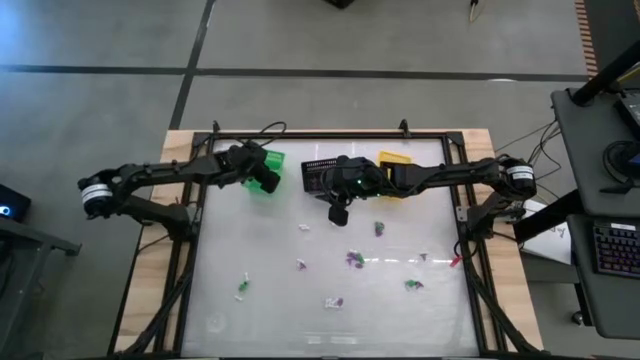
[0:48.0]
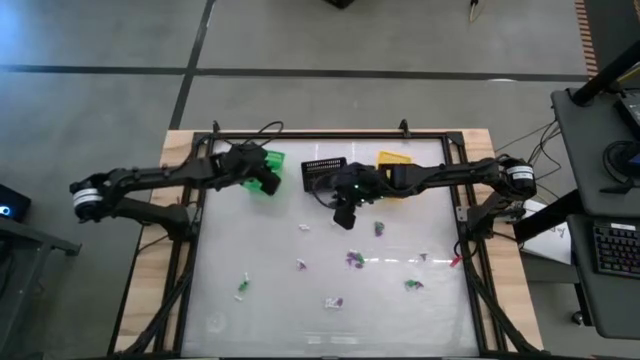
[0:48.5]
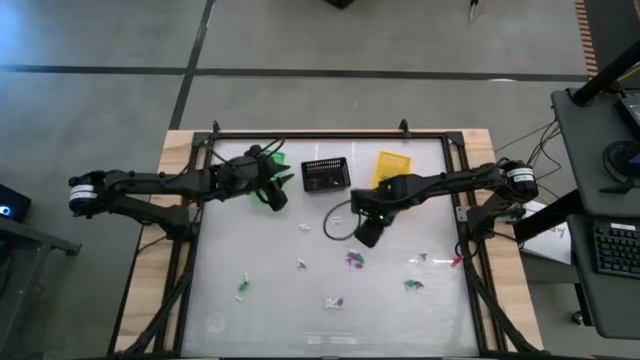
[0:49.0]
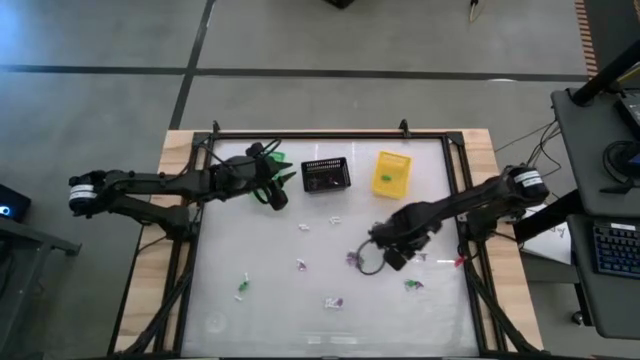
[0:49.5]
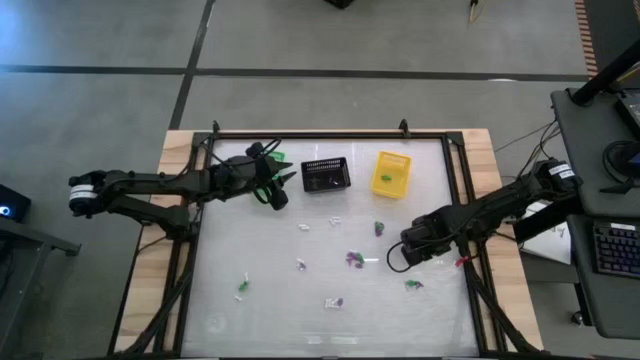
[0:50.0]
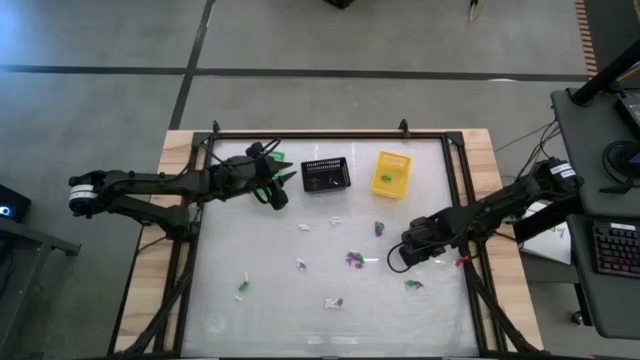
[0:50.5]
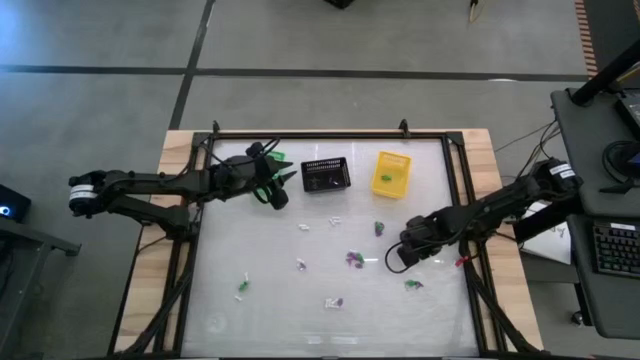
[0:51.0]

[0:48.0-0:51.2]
Task: Sort Halloween decoration
Put the purple witch hat toy into the black basket

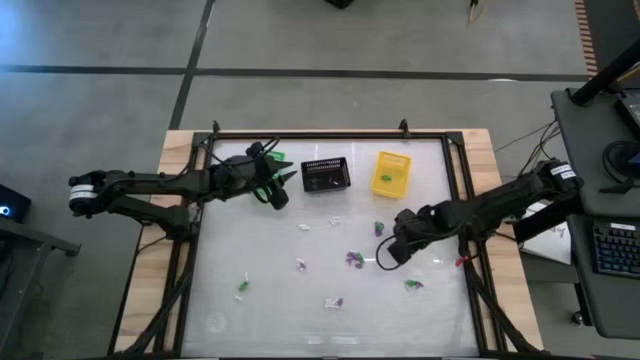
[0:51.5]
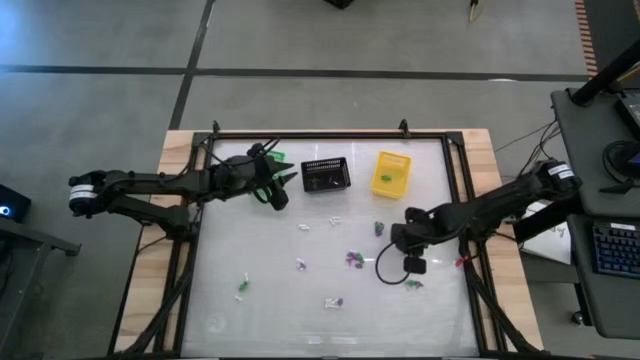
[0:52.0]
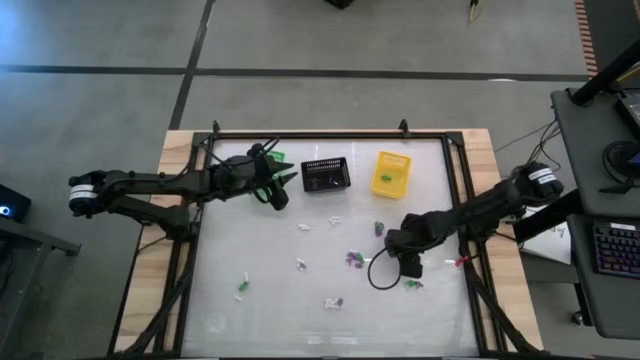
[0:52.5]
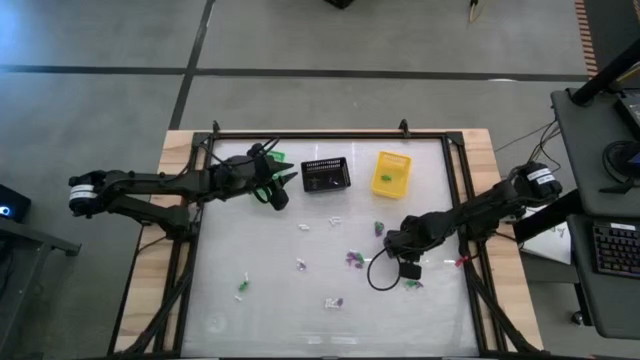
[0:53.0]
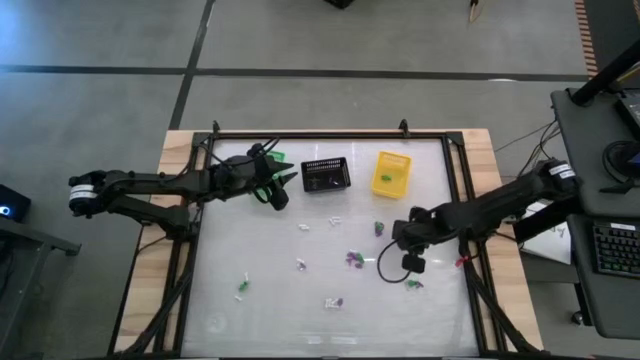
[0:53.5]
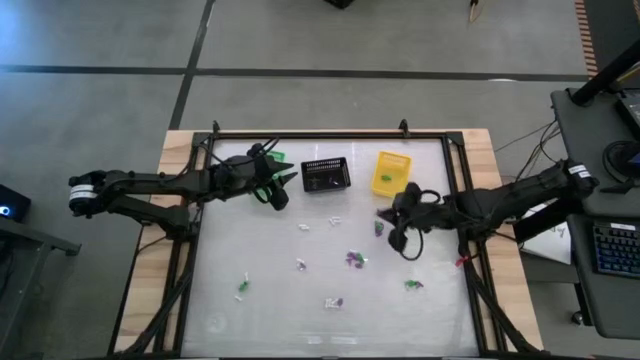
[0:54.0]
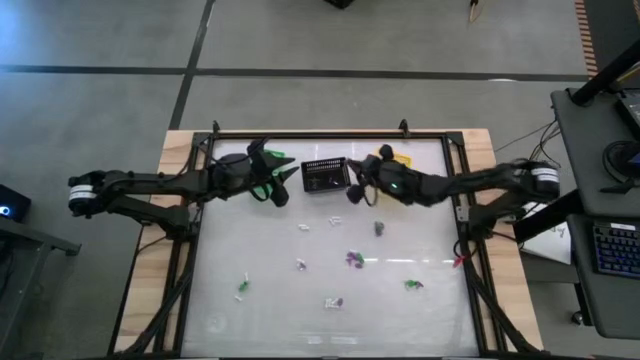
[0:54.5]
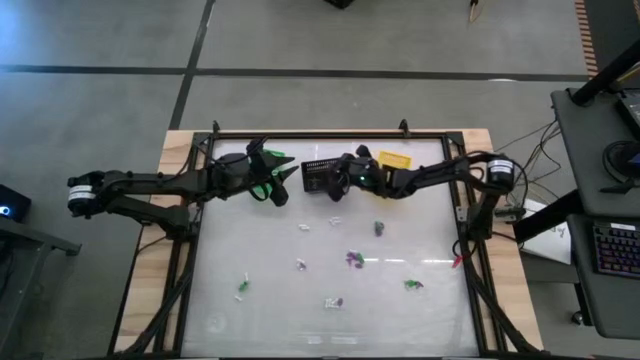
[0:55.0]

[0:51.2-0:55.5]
Put the purple witch hat toy into the black basket

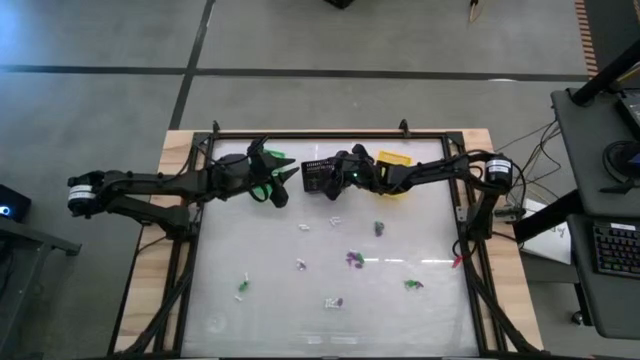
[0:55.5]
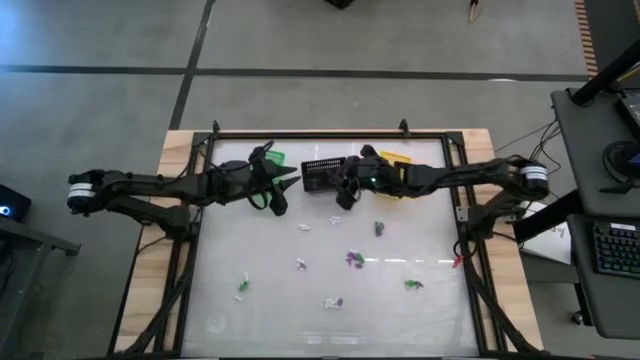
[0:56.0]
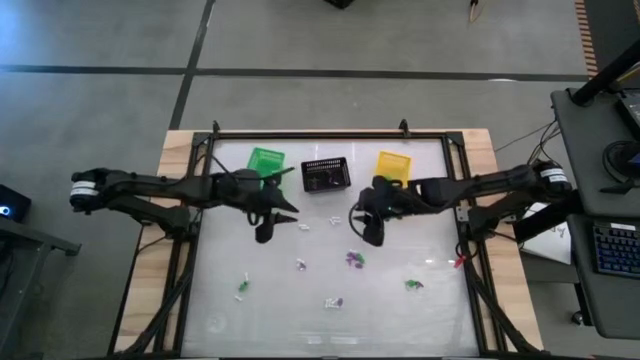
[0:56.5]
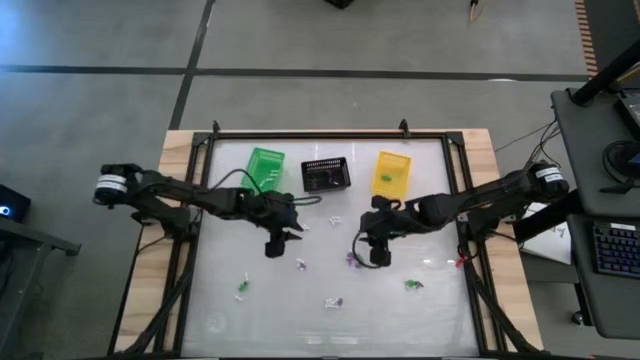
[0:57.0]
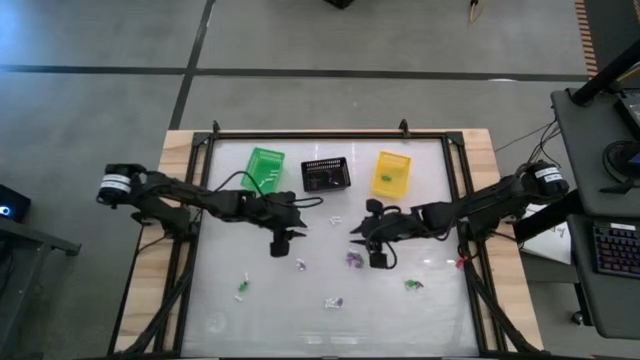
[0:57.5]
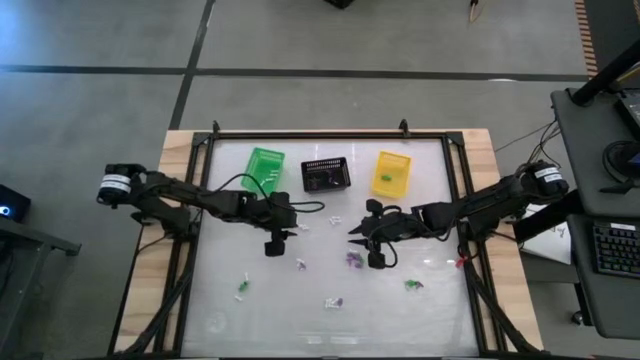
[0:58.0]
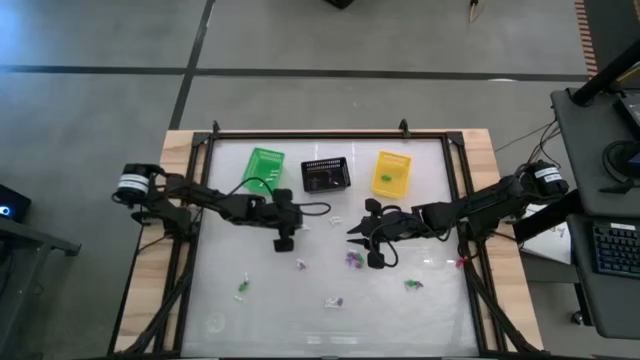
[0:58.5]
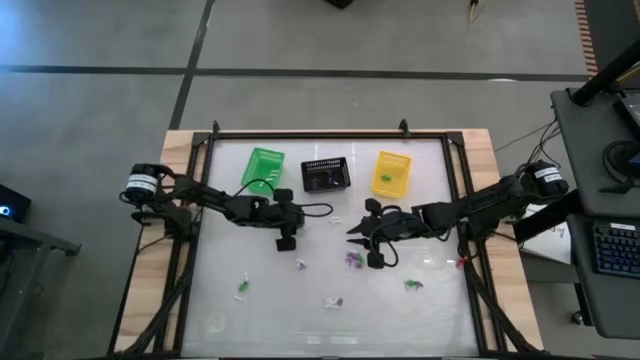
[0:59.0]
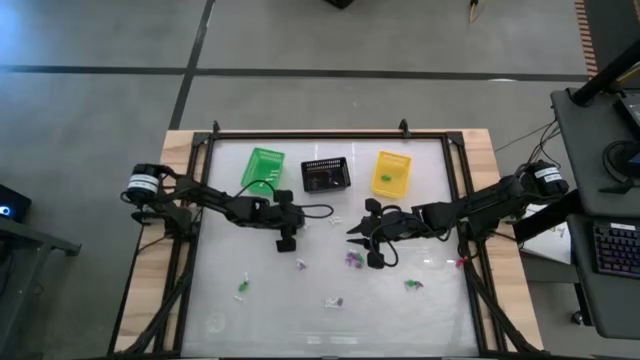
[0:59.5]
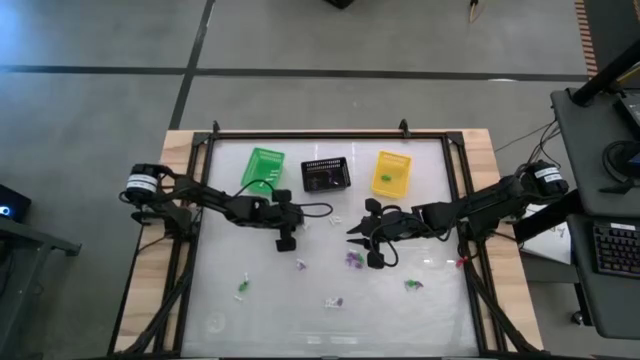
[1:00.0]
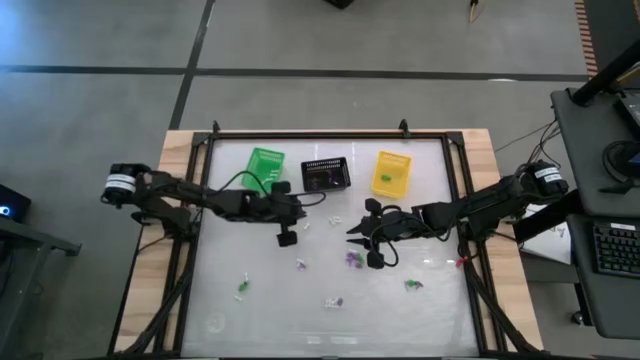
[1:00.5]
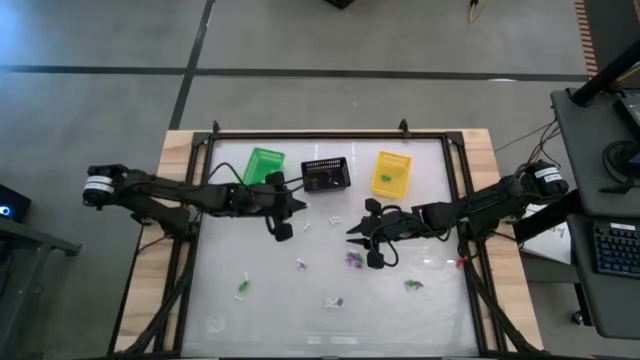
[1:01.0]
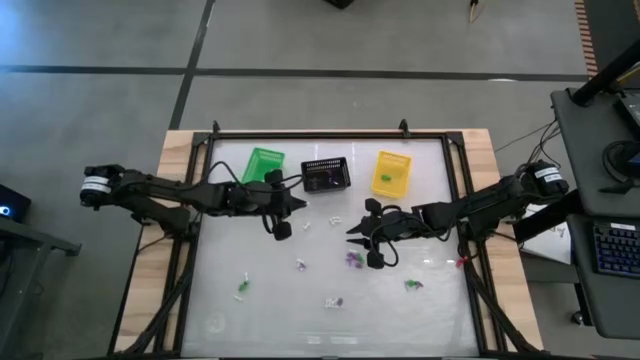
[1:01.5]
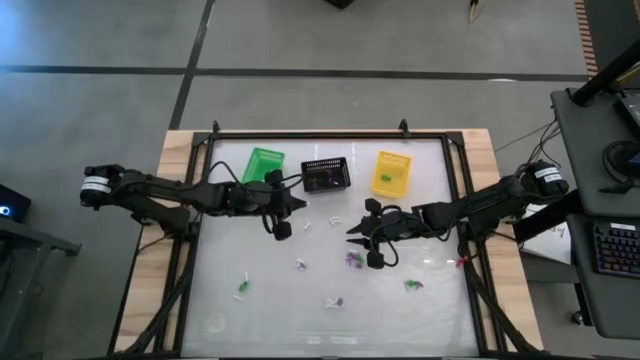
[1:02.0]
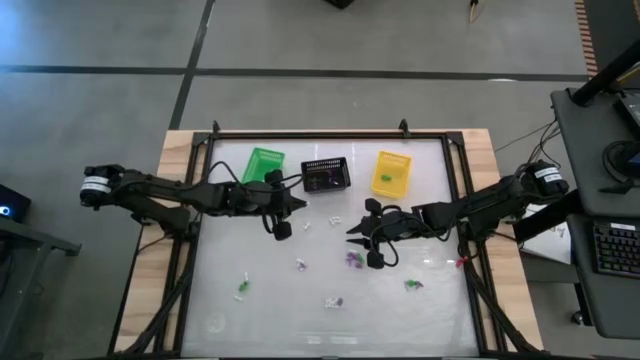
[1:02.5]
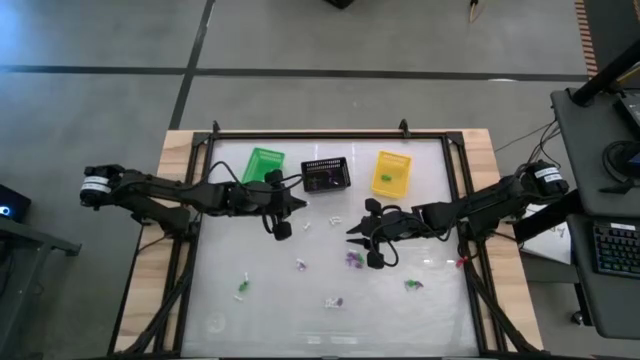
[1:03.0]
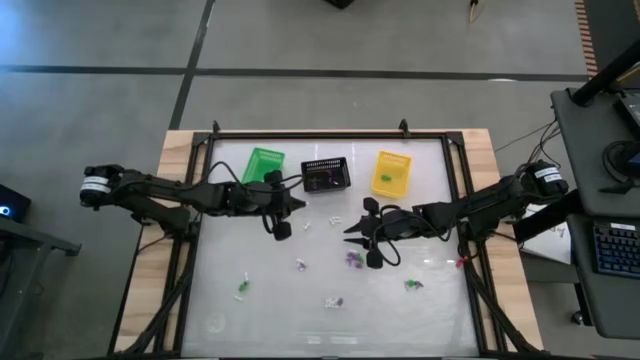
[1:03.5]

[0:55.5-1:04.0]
Put the white bone toy into the green basket

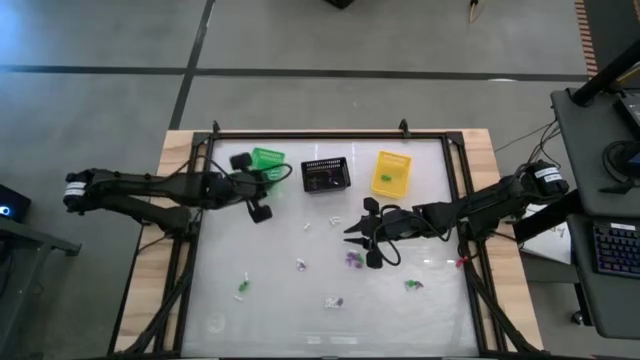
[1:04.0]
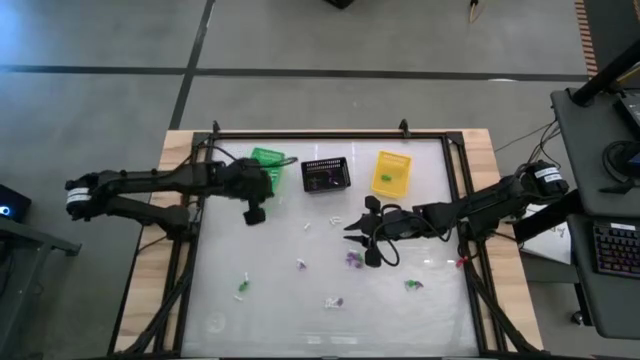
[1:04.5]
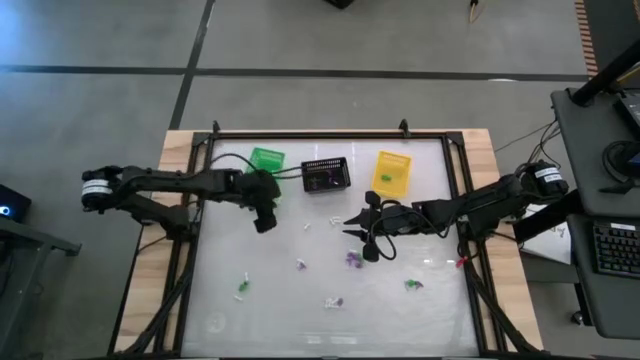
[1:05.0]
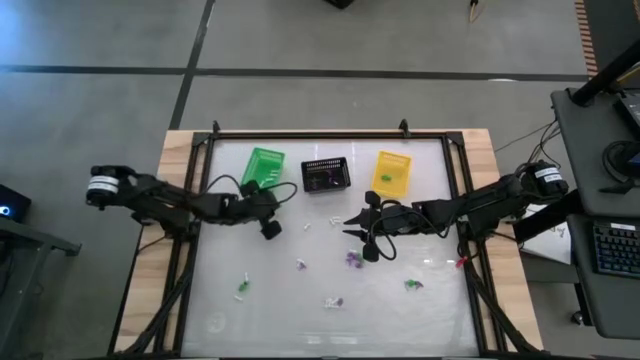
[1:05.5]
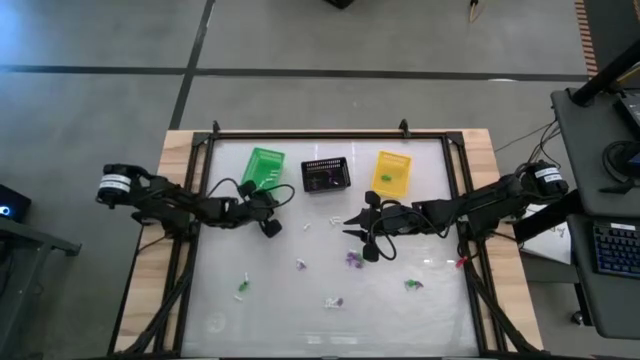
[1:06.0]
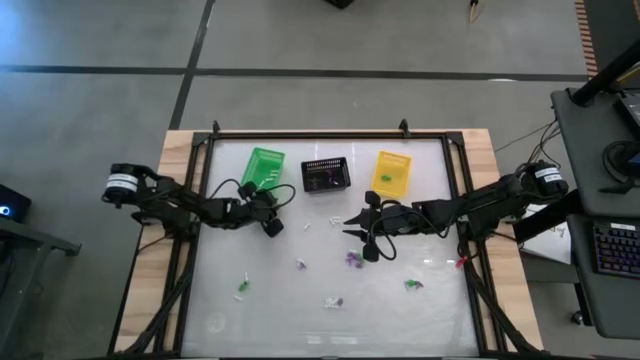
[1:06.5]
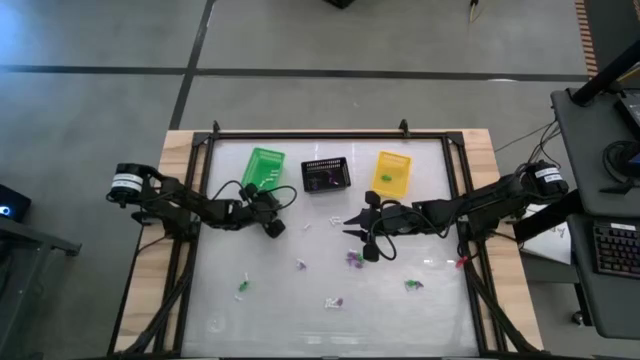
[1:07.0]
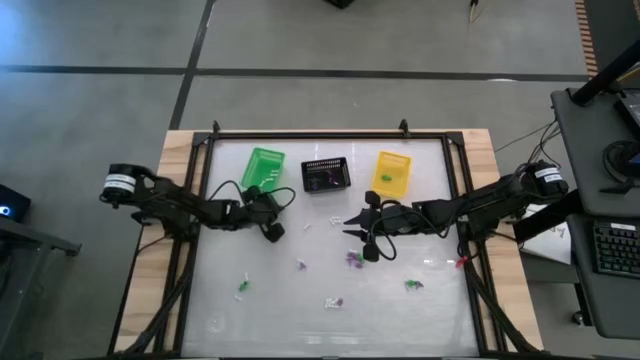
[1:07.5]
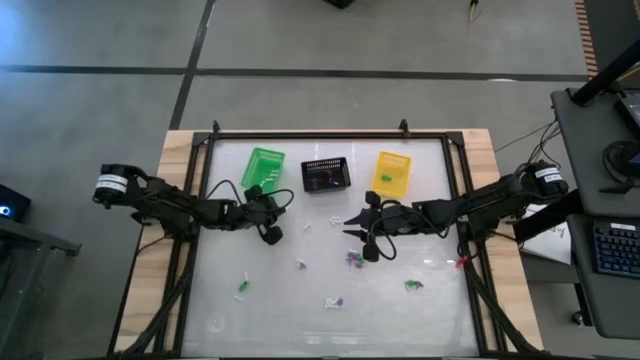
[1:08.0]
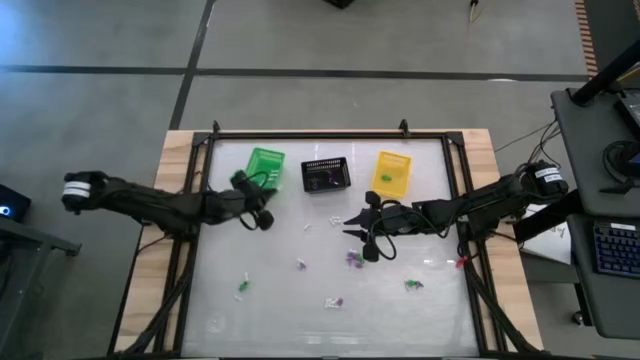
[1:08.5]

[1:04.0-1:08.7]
Put the white bone toy into the green basket
